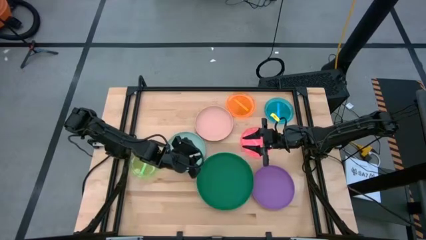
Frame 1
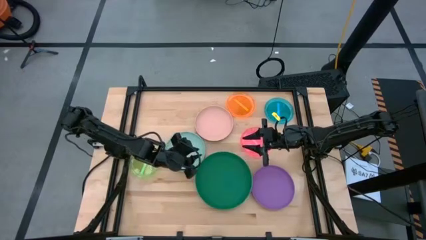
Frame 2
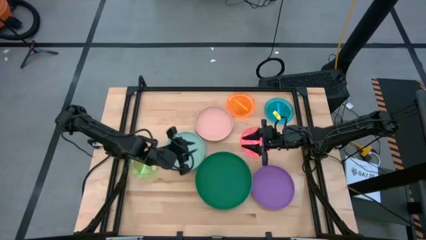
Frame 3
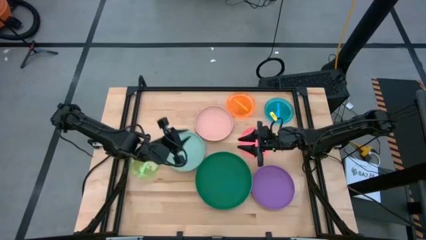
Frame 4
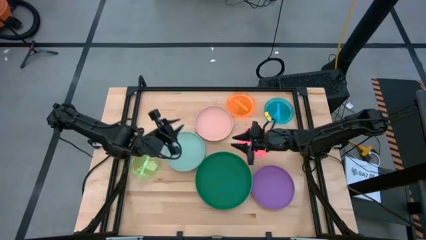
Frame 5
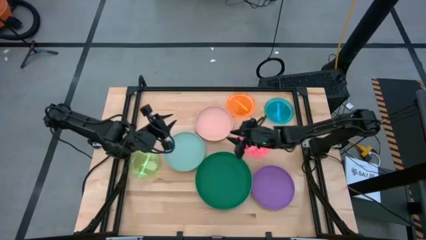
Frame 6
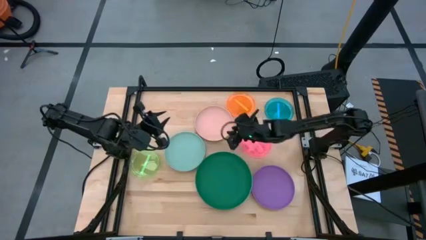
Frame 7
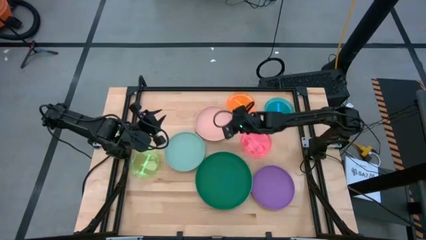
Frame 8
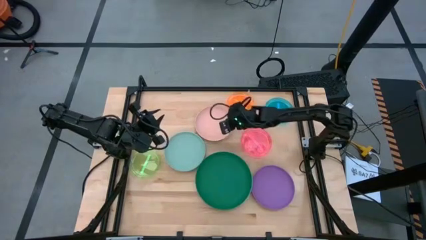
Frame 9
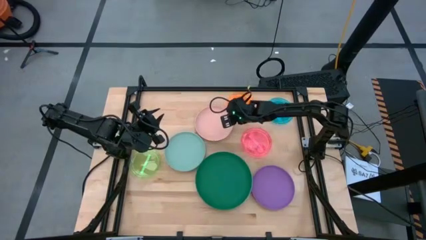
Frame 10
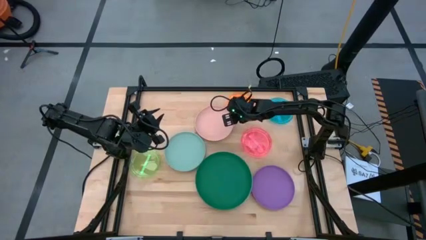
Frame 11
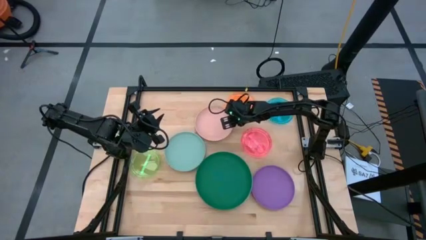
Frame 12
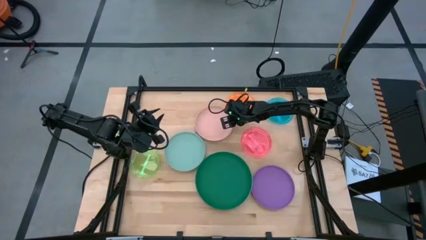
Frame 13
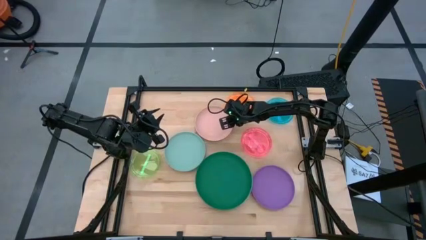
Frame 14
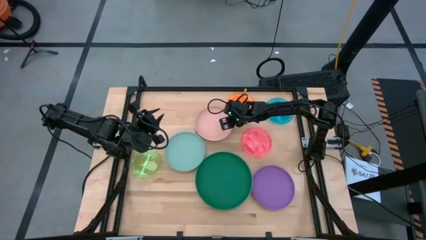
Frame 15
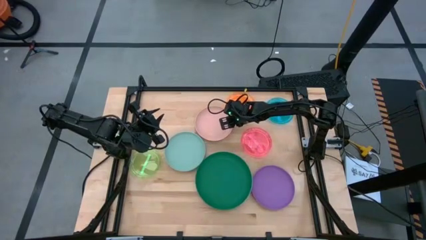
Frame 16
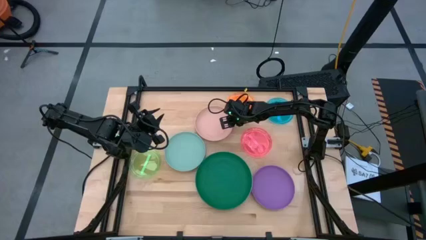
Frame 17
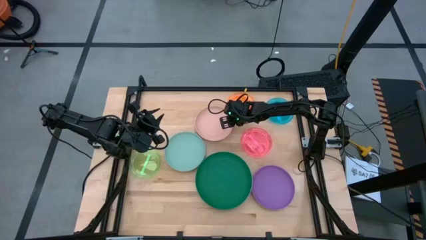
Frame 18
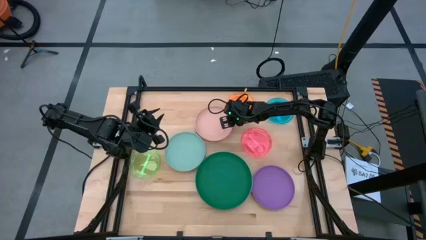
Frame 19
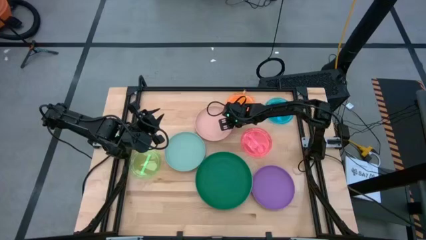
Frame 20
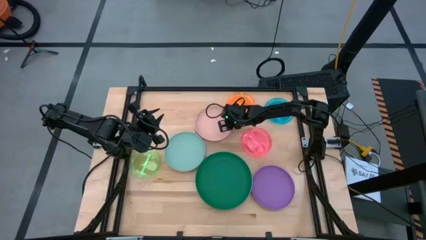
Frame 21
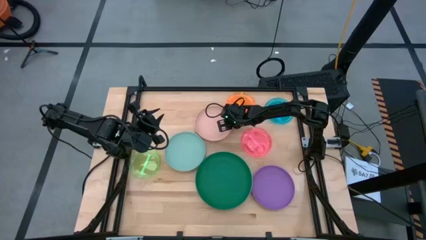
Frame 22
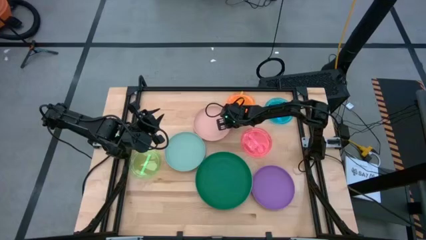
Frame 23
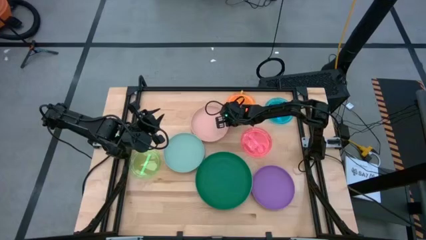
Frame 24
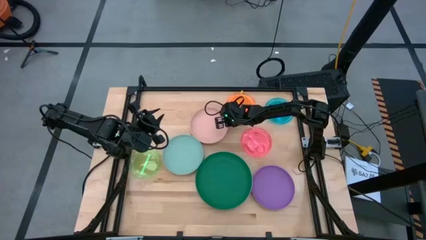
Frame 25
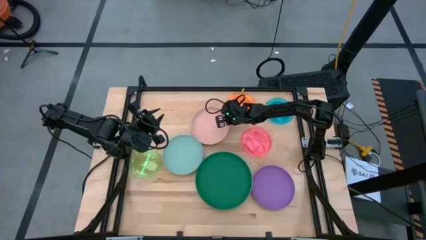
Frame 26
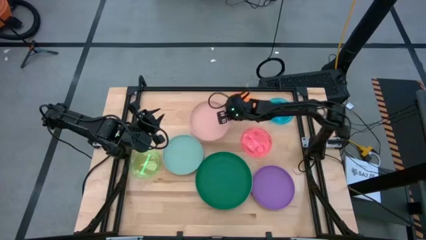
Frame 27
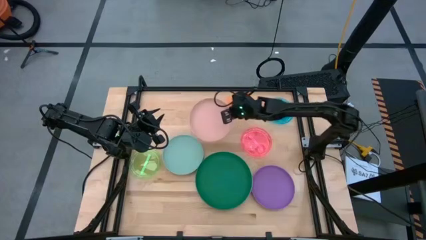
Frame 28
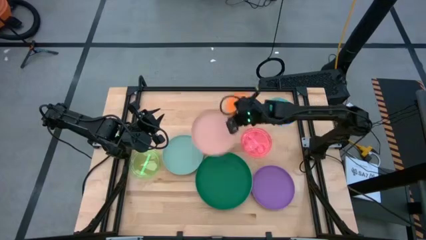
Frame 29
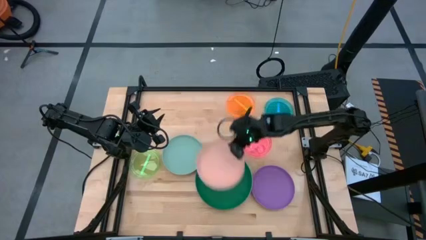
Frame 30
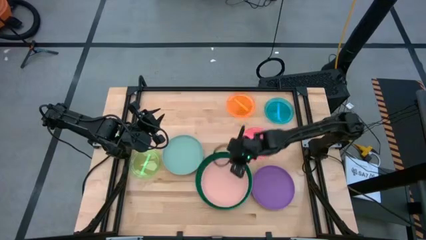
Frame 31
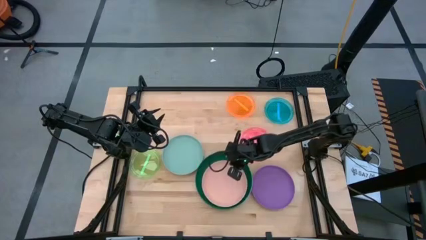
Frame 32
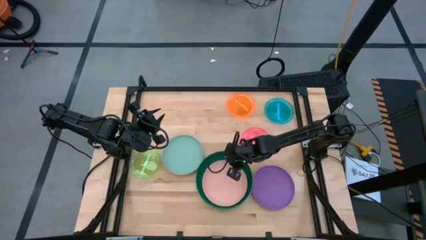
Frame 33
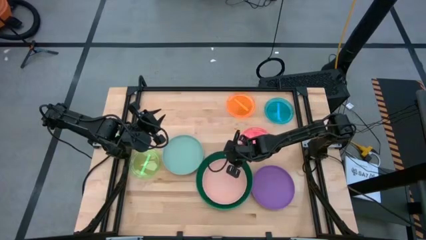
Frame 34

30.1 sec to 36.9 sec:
Task: Stack plastic plates
Stack the light pink plate on top of the dark green plate

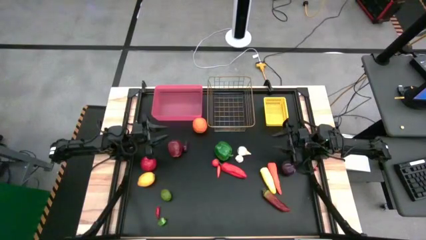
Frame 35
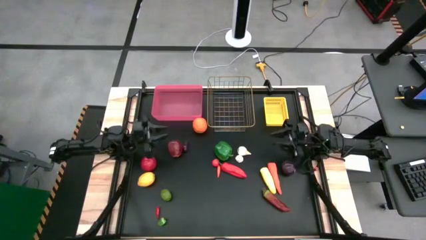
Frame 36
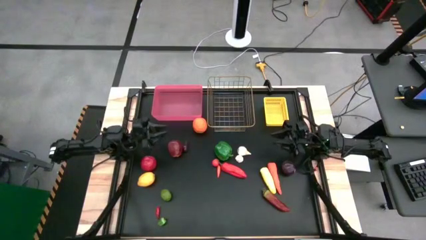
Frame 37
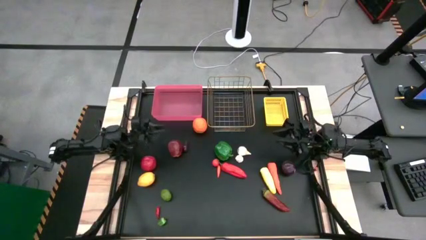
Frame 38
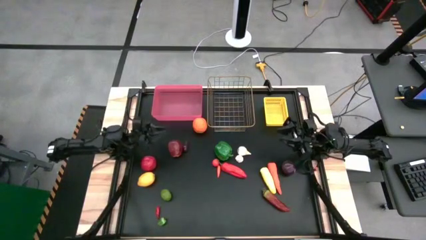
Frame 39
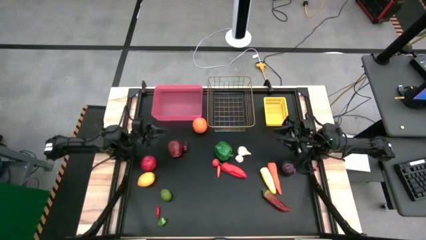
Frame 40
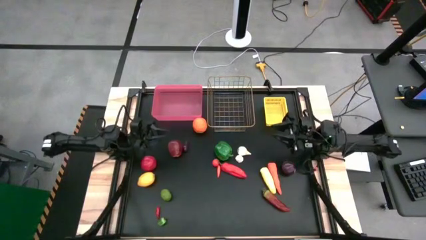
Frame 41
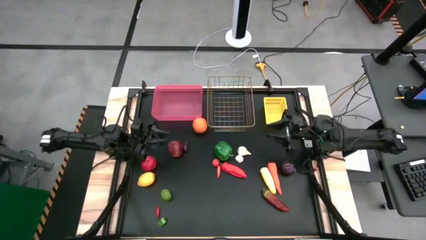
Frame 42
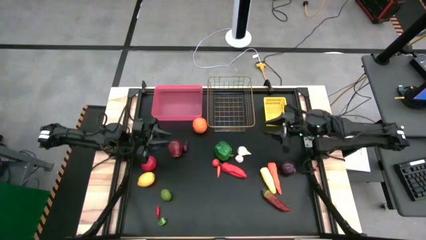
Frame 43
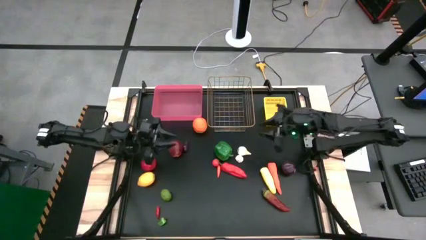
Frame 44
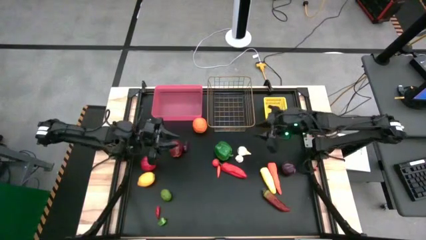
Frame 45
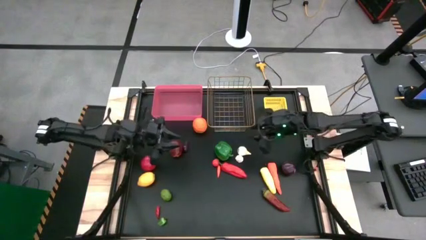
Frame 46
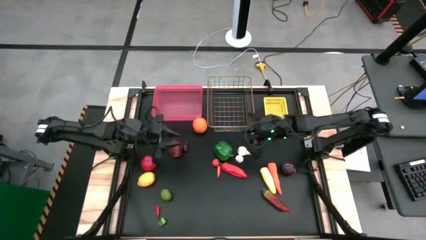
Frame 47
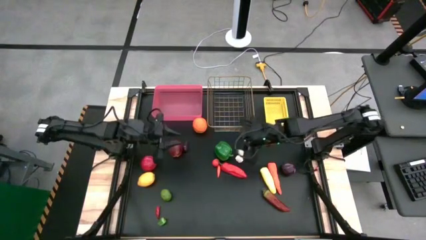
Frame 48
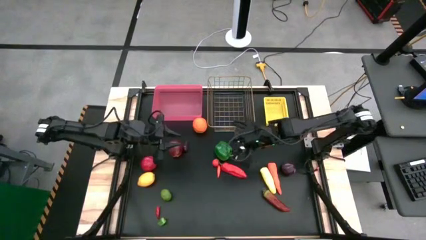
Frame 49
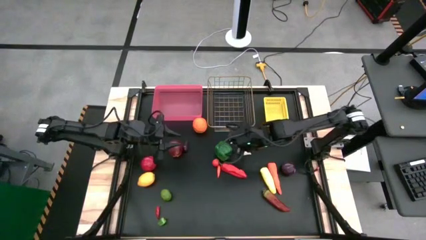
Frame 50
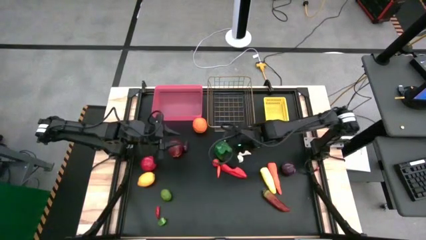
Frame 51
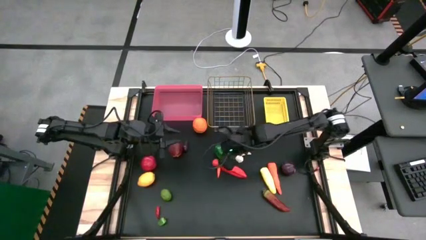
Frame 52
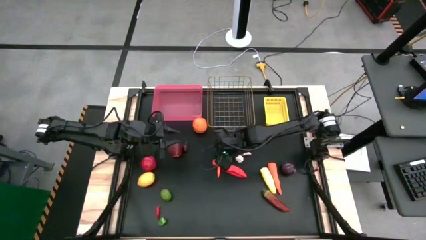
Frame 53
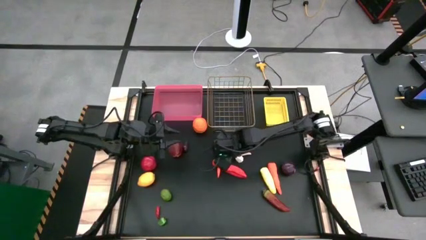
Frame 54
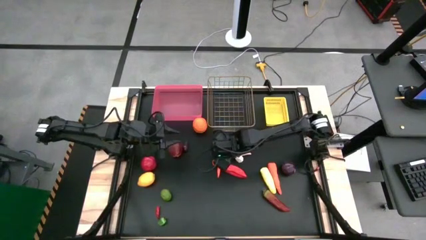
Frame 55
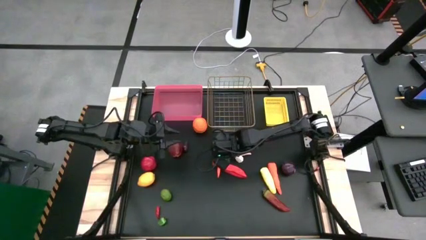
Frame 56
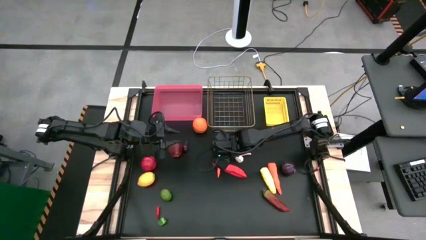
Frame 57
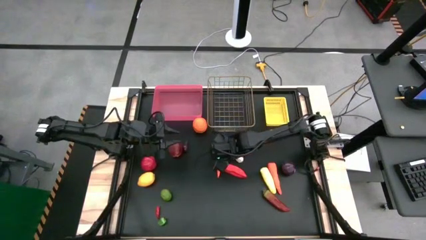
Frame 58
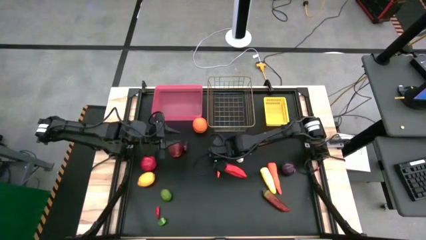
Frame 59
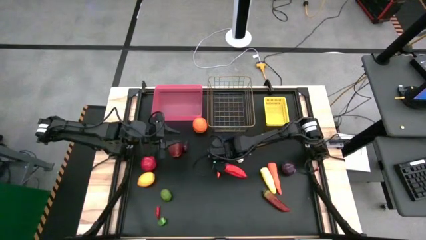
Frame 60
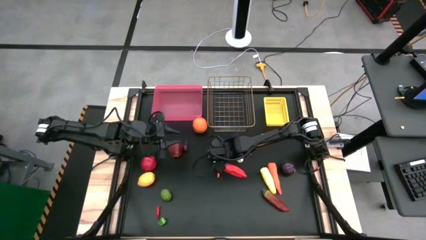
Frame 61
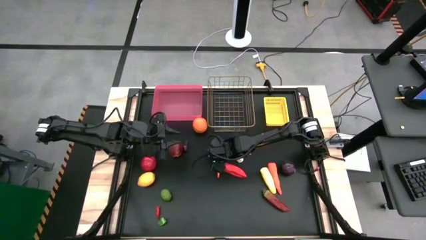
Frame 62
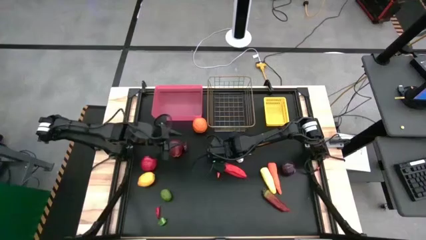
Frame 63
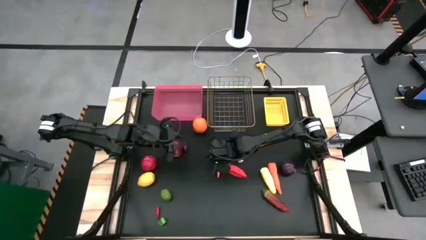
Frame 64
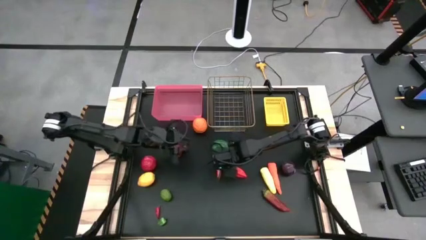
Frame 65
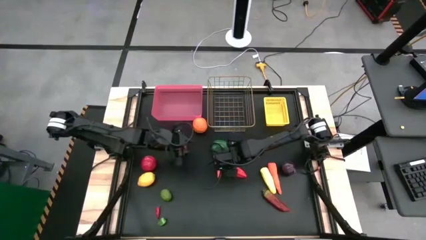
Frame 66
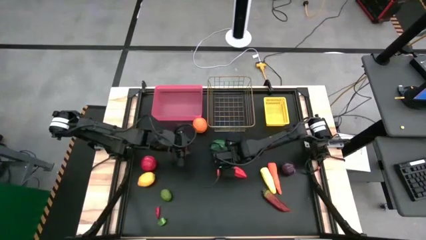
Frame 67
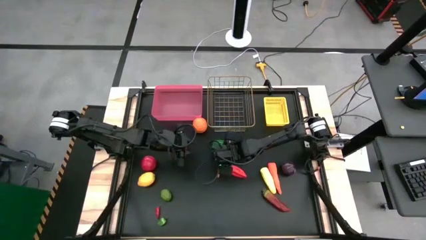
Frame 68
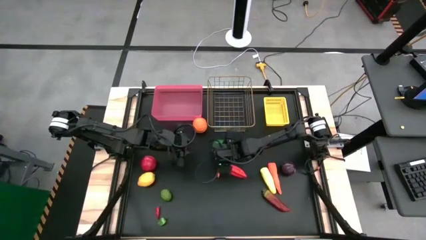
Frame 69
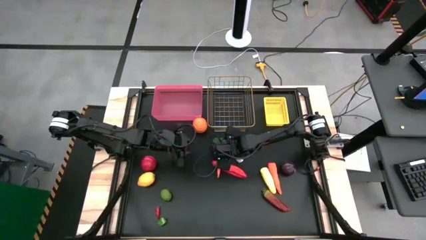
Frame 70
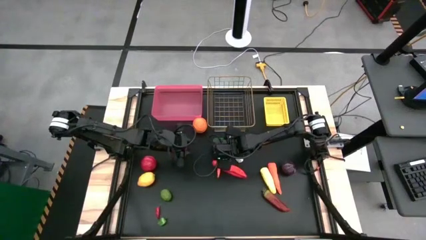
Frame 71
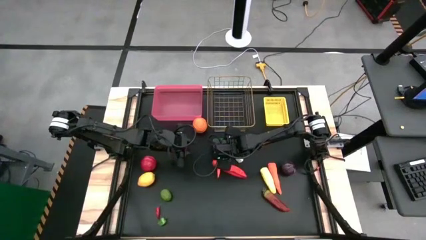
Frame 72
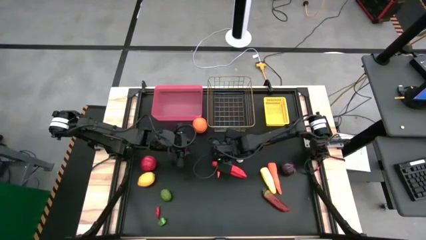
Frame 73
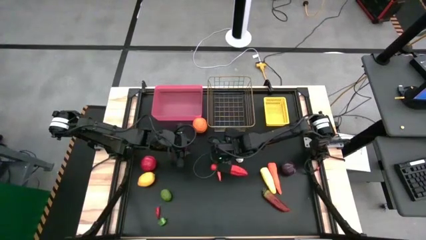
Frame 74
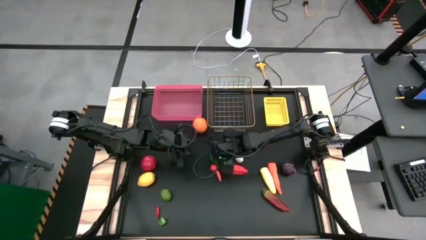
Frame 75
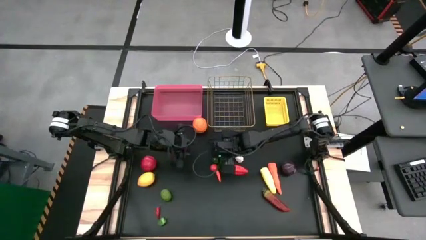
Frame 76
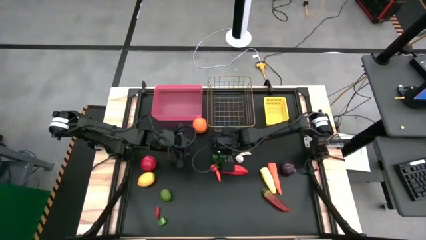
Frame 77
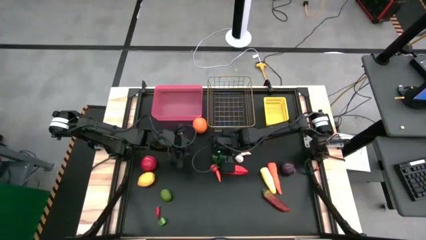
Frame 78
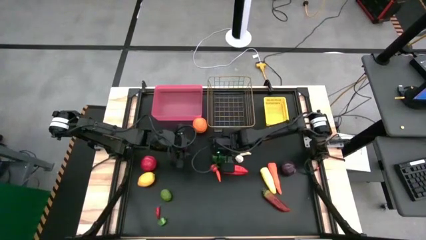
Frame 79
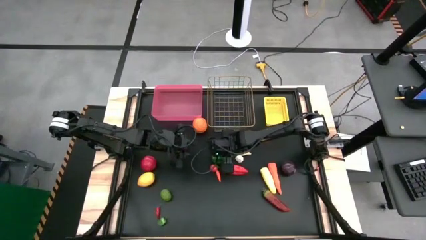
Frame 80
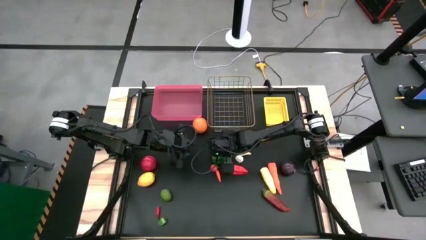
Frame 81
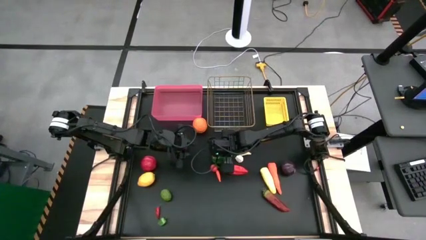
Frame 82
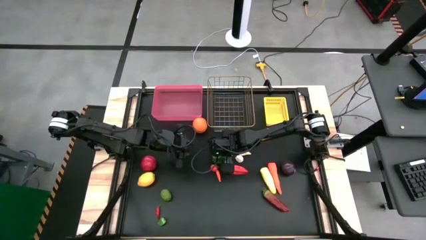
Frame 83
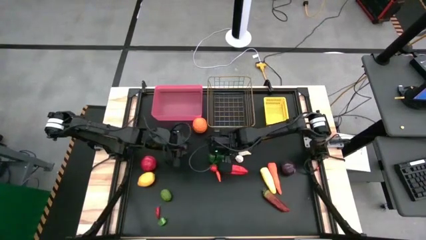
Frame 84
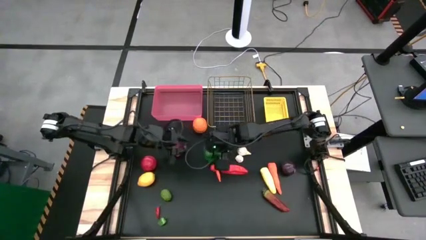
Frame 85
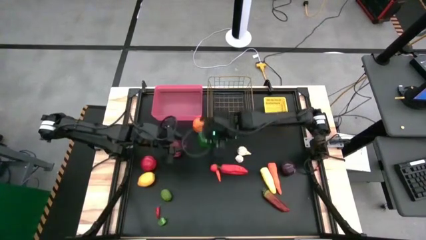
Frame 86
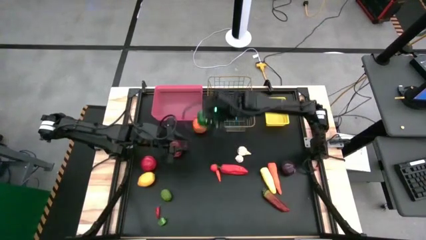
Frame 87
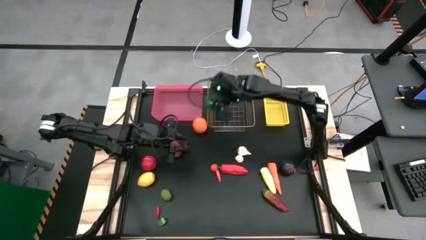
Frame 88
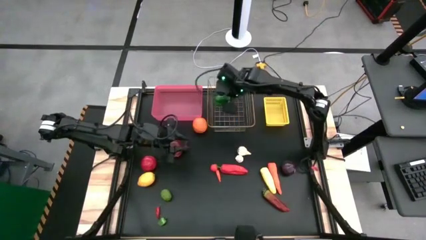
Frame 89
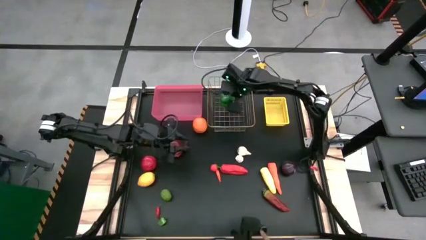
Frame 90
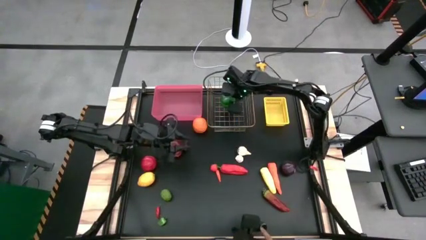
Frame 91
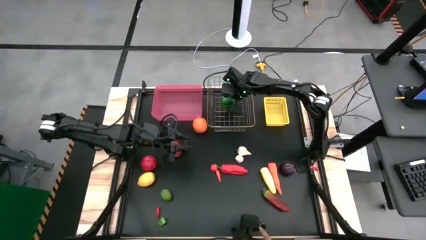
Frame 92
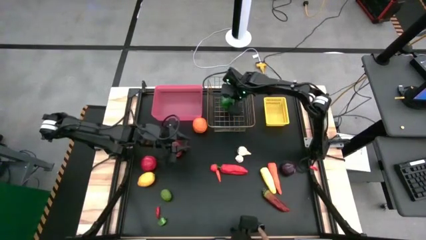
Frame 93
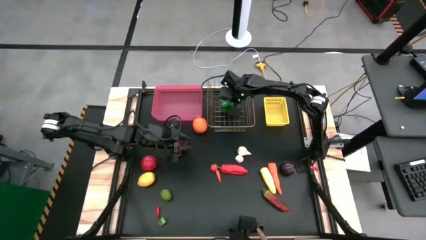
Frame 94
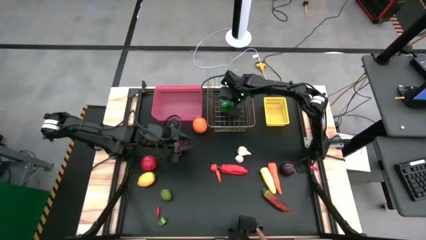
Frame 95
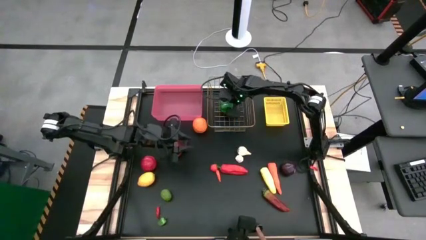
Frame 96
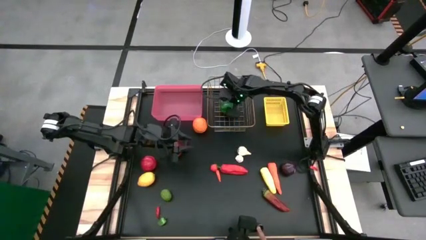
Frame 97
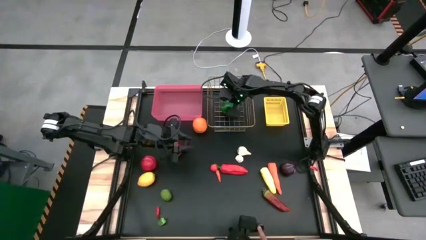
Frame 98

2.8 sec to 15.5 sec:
Task: Sort produce into baskets
Put the green bell pepper into the gold mesh basket
